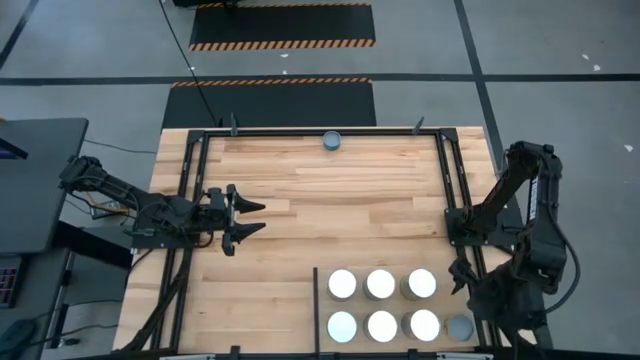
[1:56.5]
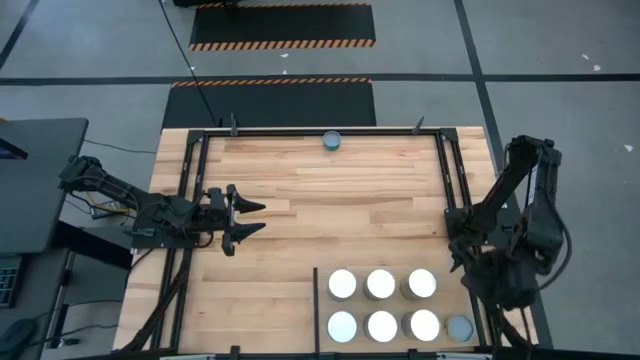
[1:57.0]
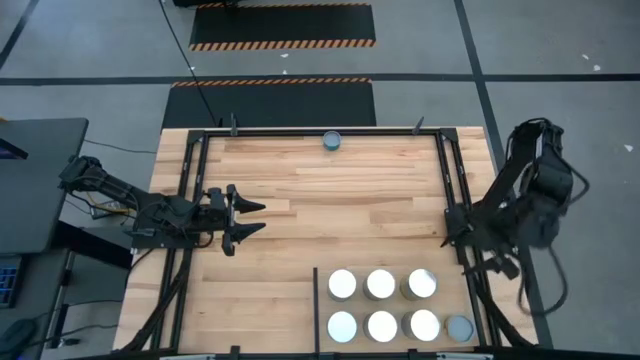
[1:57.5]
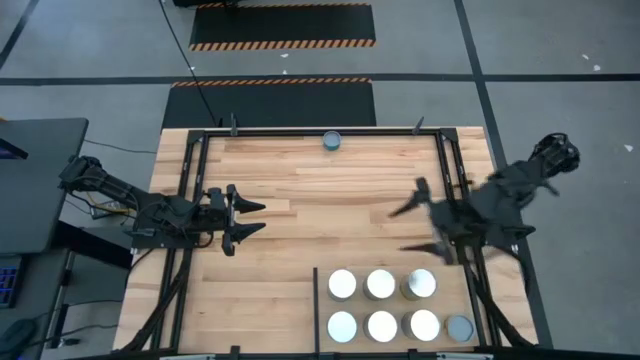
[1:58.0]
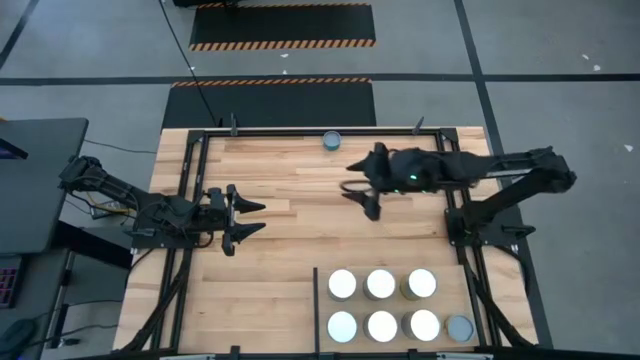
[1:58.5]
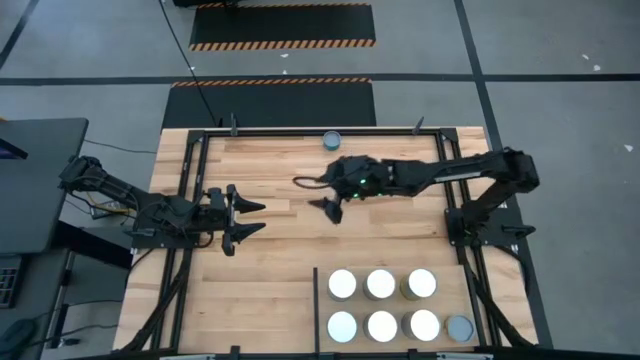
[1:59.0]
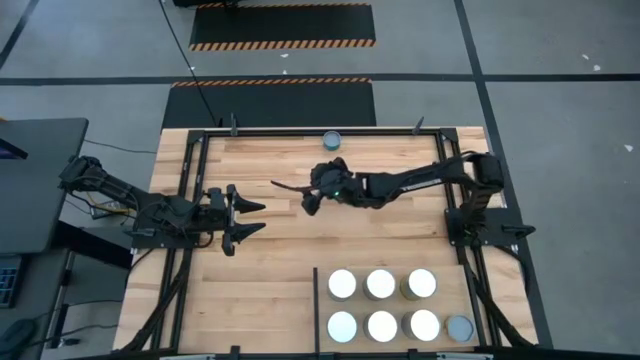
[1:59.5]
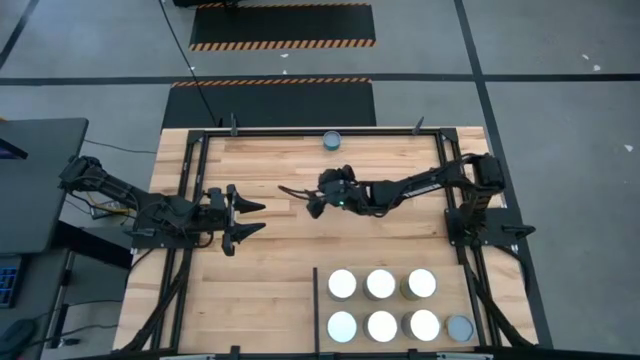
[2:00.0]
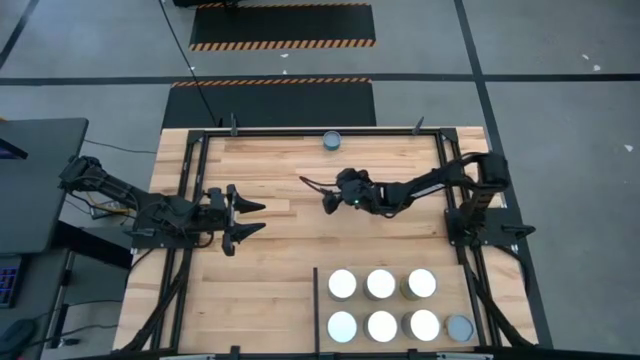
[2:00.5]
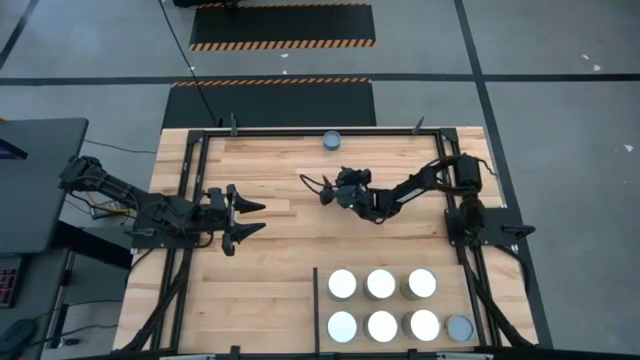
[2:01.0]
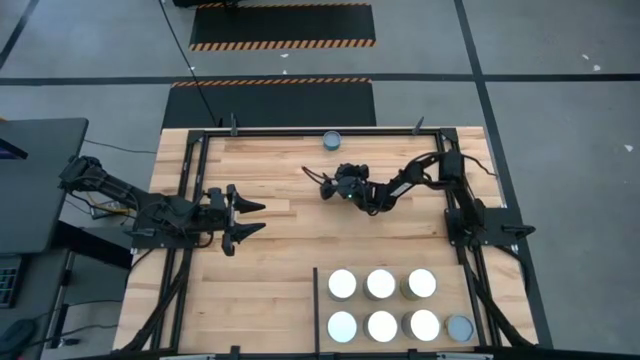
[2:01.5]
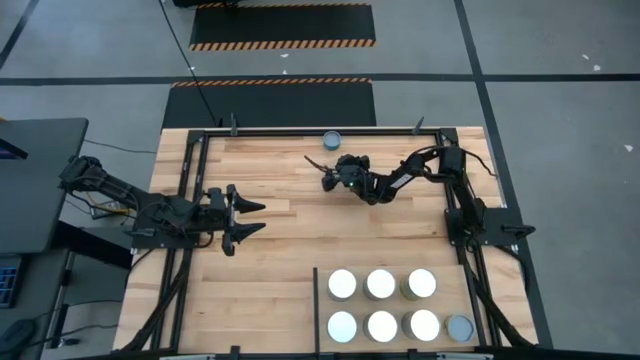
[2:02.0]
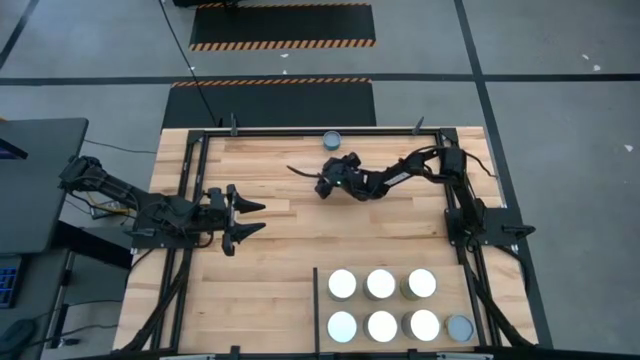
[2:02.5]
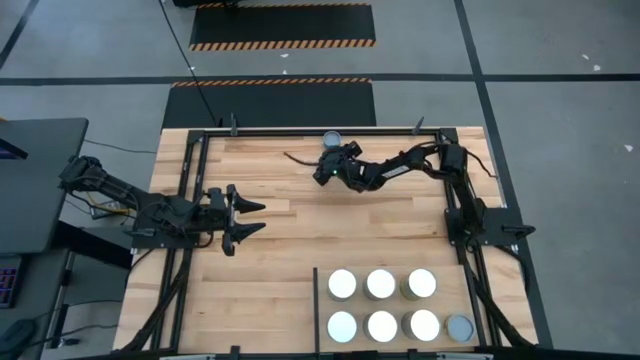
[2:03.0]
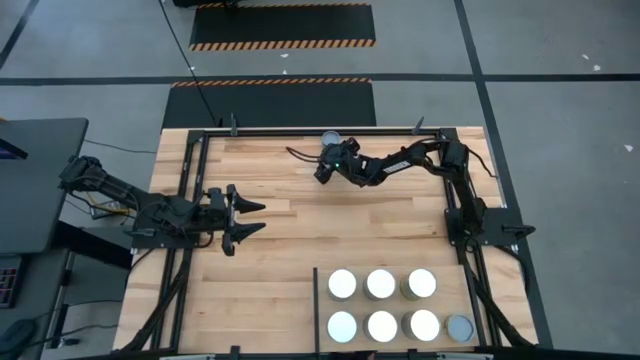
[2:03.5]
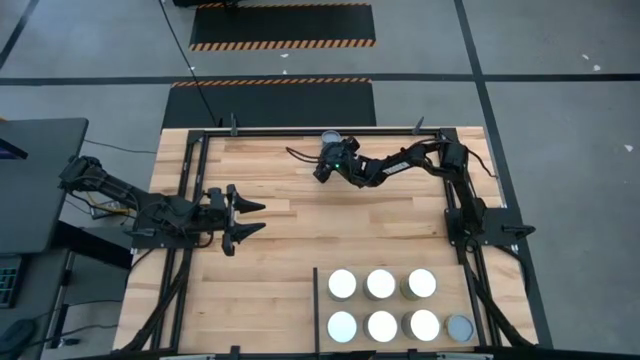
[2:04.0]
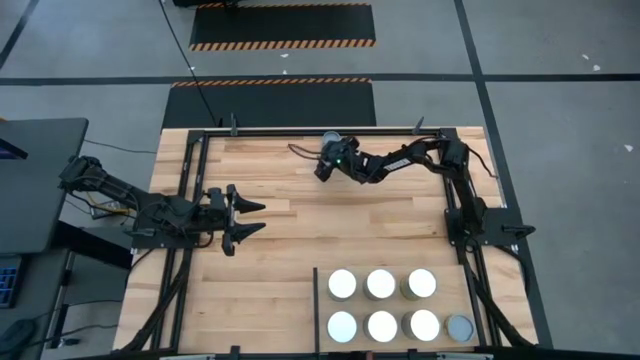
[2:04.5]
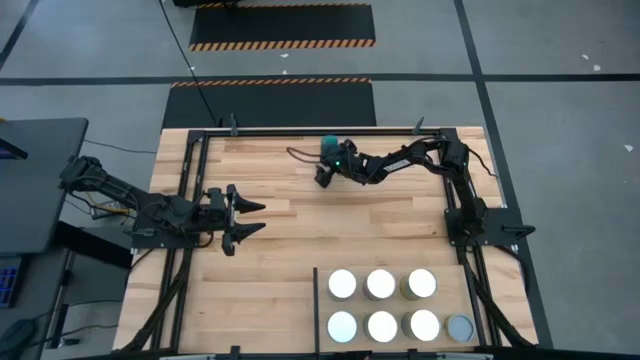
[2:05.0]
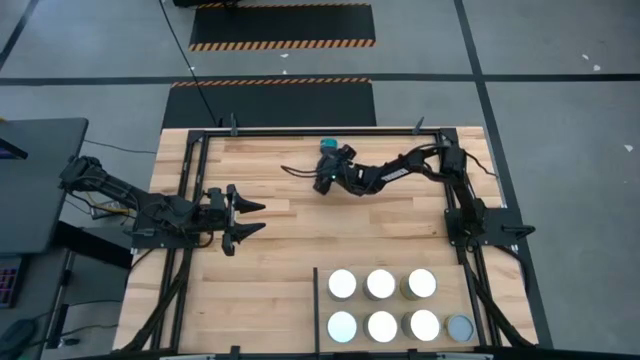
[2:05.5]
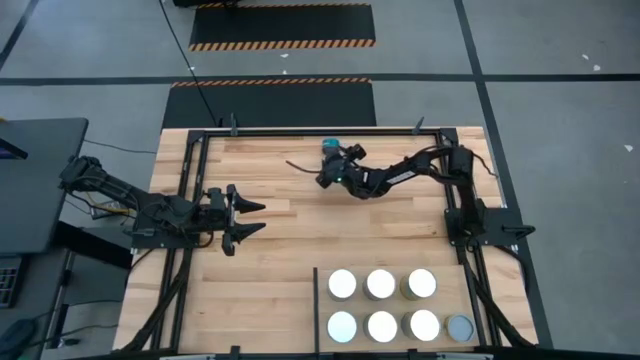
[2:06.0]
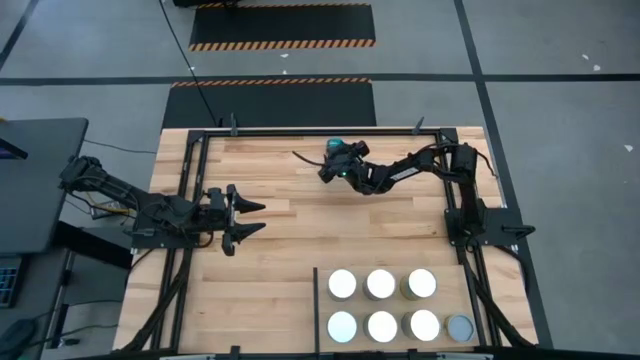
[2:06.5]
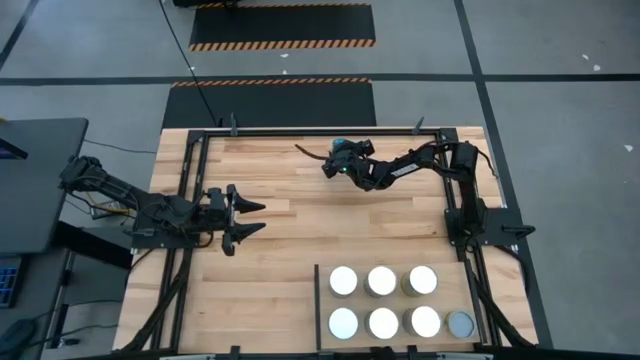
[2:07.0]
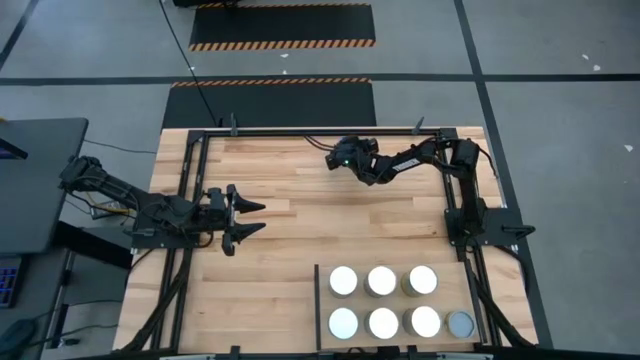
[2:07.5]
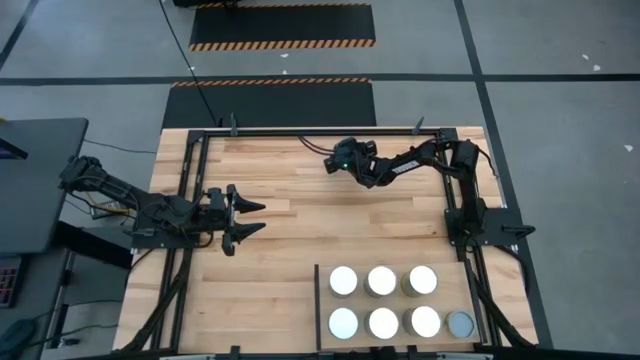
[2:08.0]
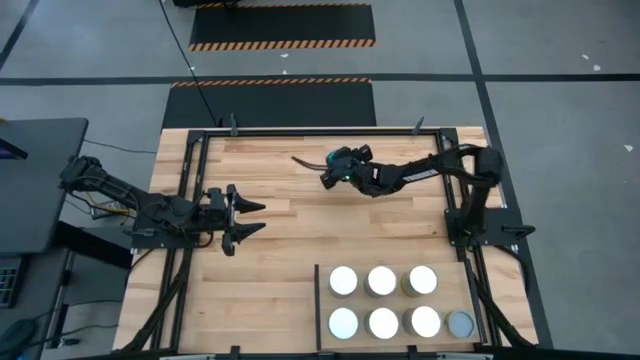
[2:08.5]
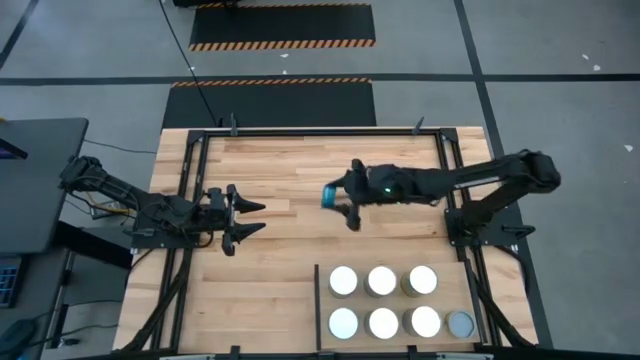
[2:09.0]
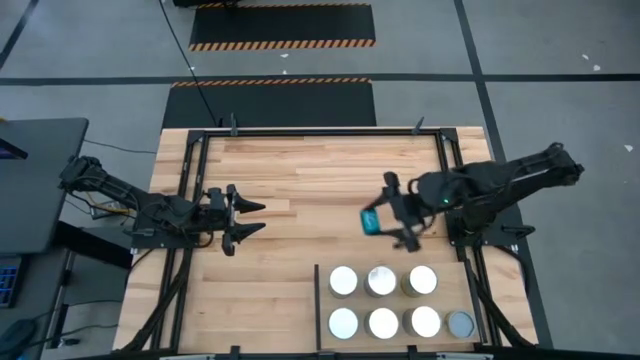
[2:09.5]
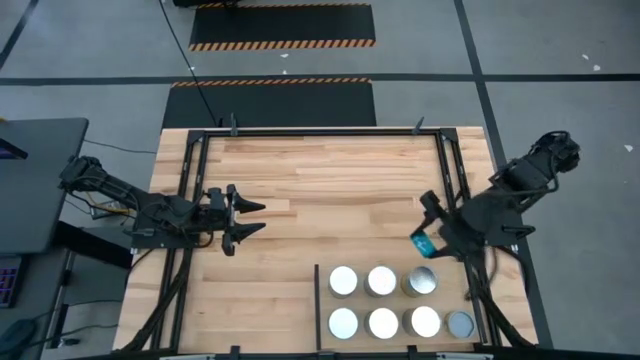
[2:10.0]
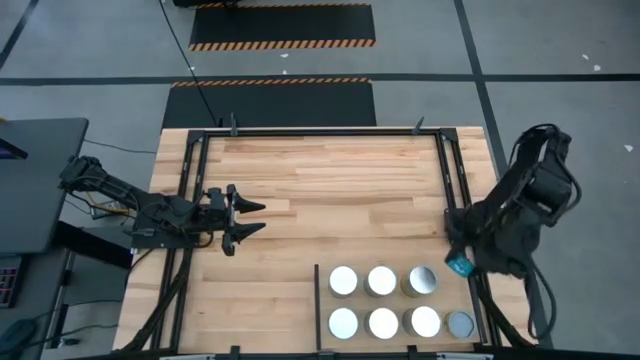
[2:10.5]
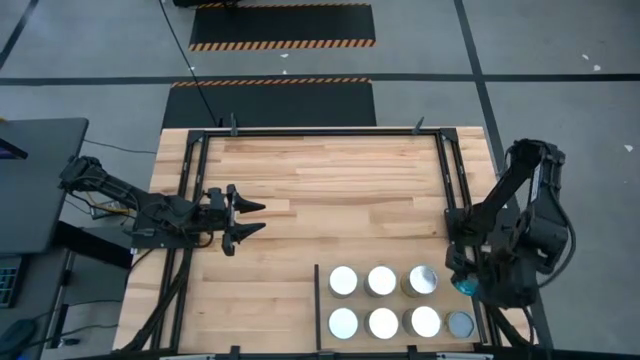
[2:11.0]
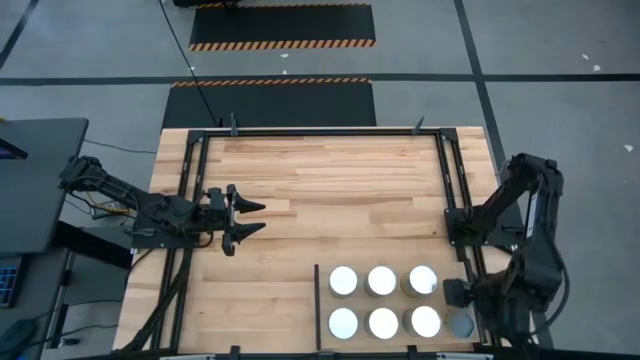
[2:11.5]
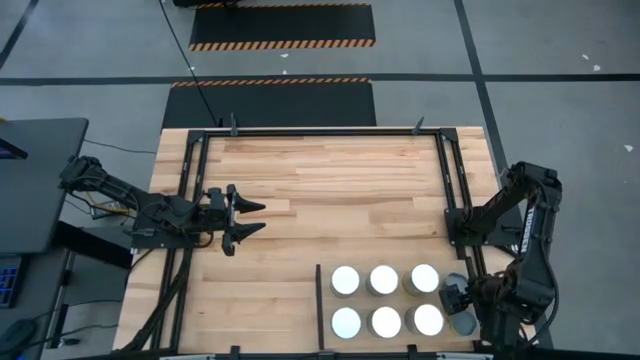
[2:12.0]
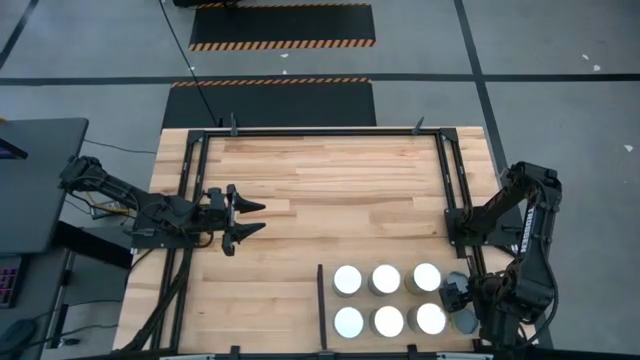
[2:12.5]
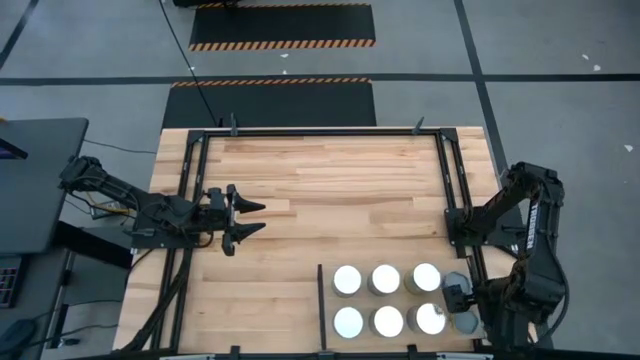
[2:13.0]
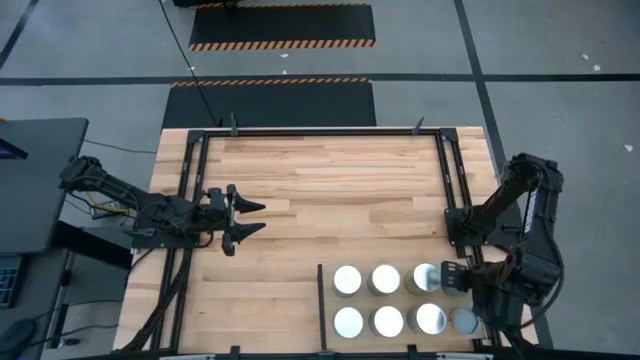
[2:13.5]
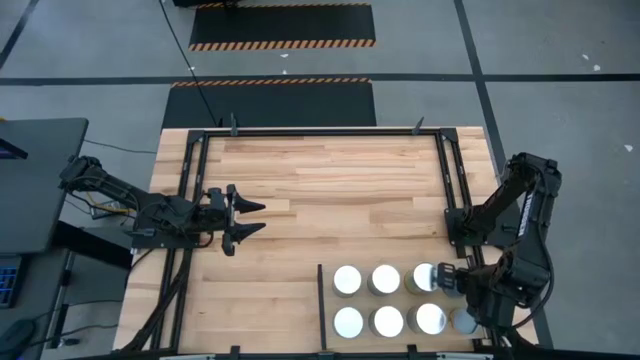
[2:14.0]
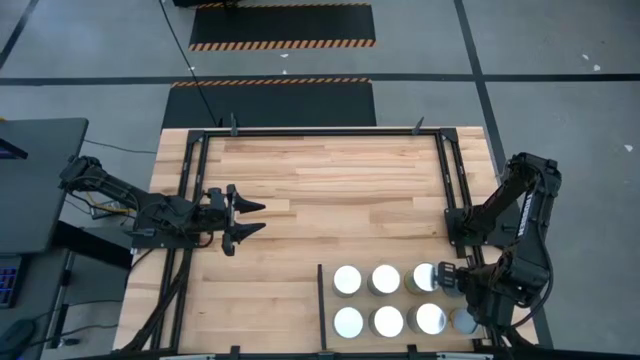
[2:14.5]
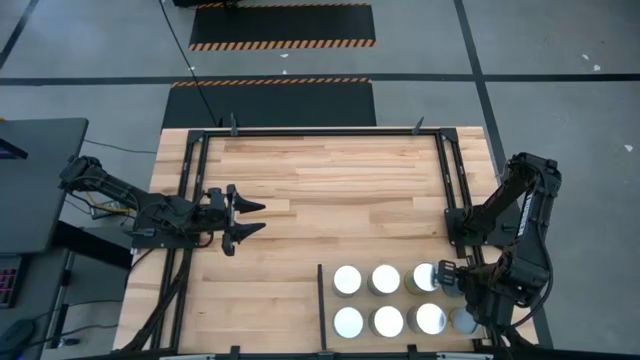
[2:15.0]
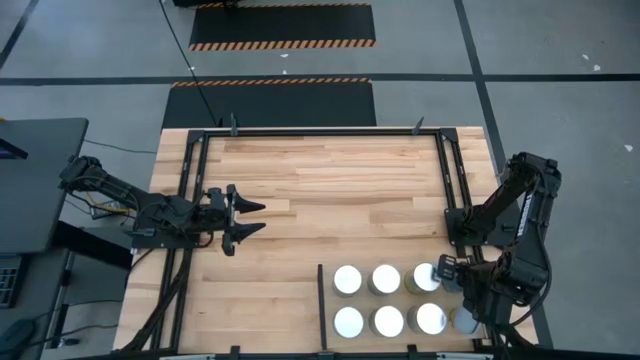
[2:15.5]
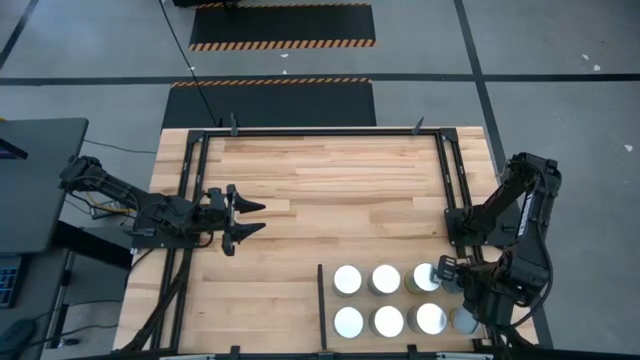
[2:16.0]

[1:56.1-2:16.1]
Task: Pick and place cans onto a shelf
Put the canned tuna on the shelf

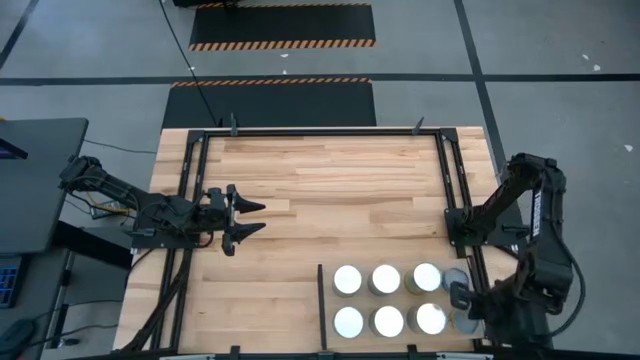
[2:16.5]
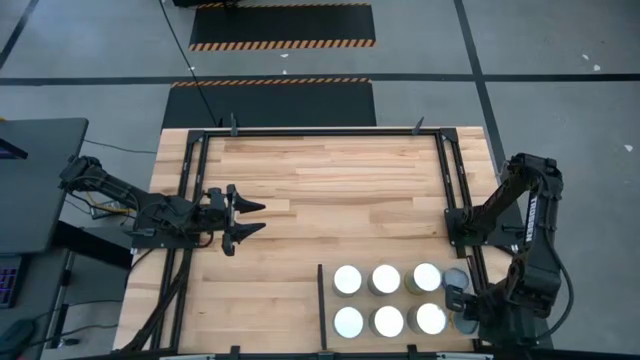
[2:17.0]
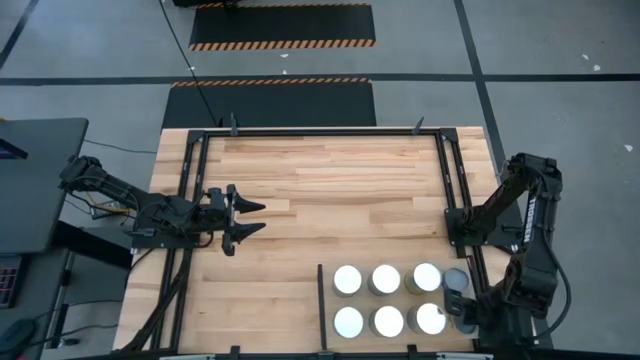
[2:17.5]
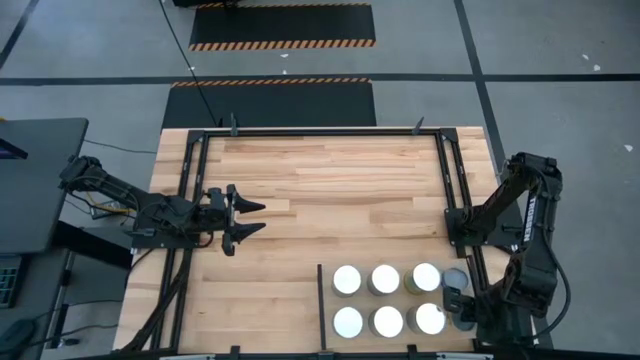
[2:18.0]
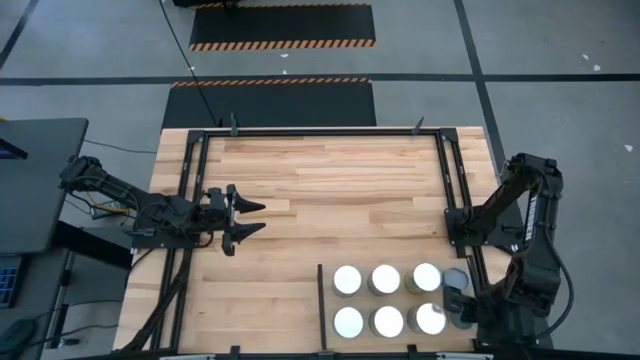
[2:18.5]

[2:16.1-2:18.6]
Adjust the canned mushrooms on the shelf
